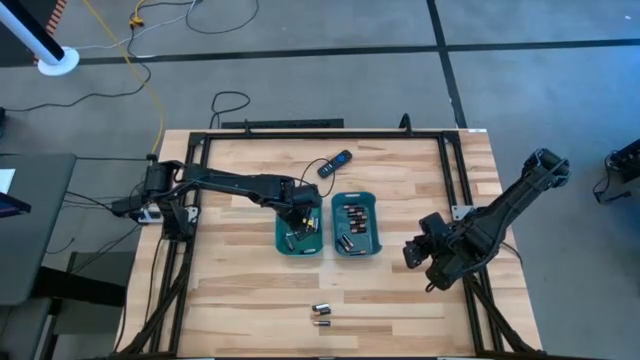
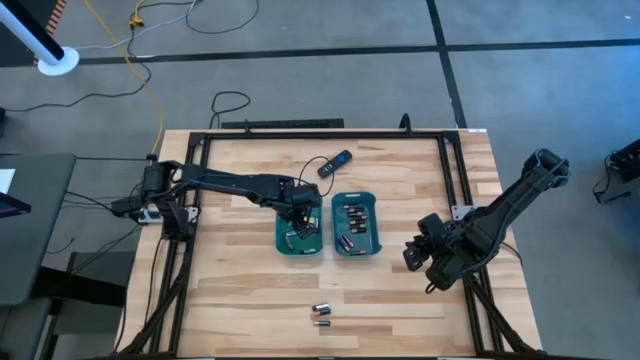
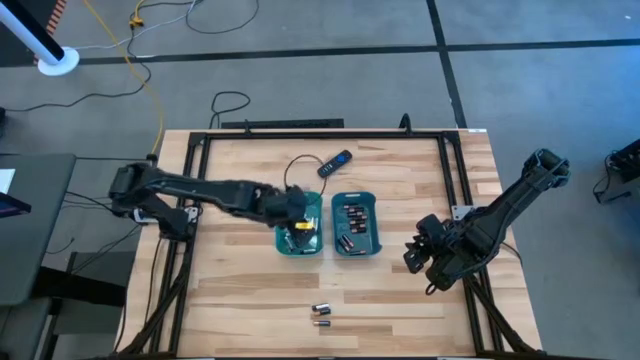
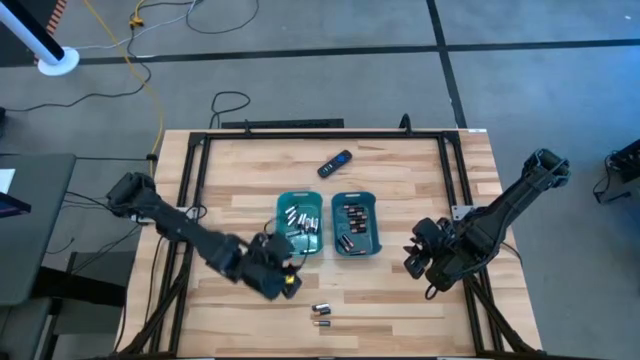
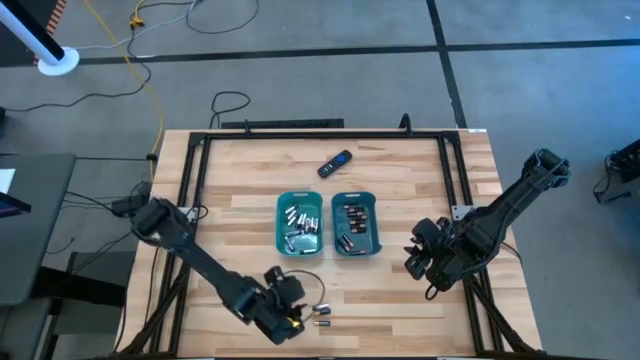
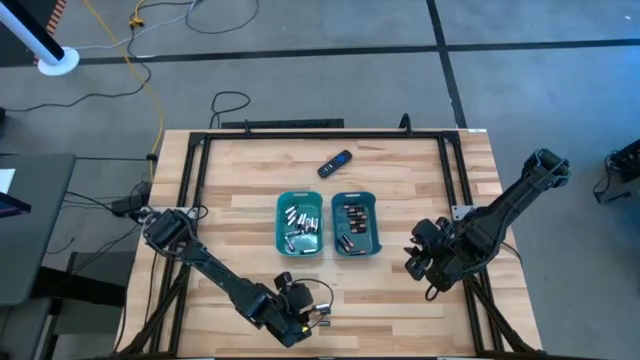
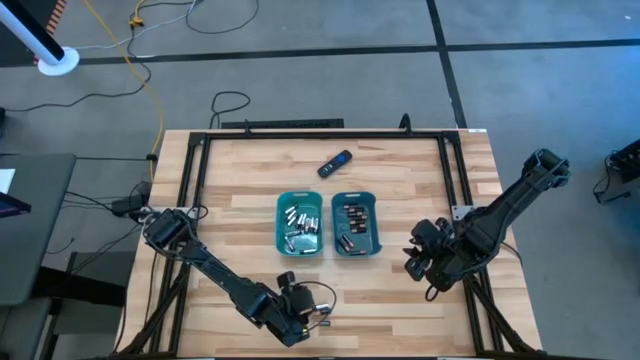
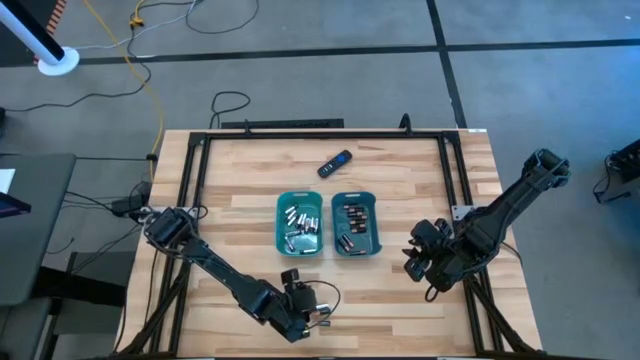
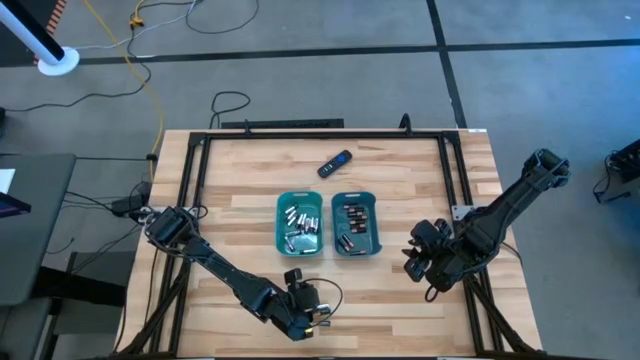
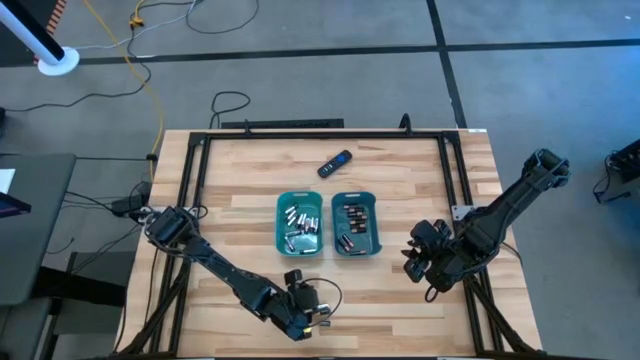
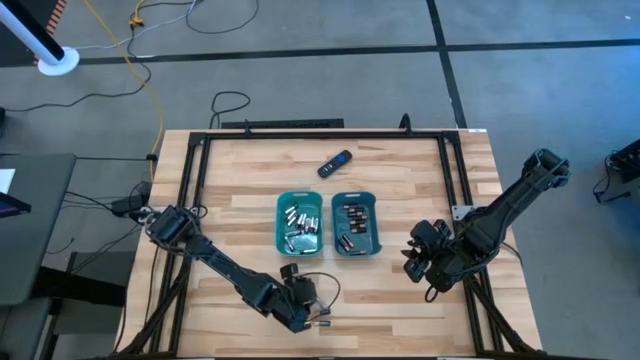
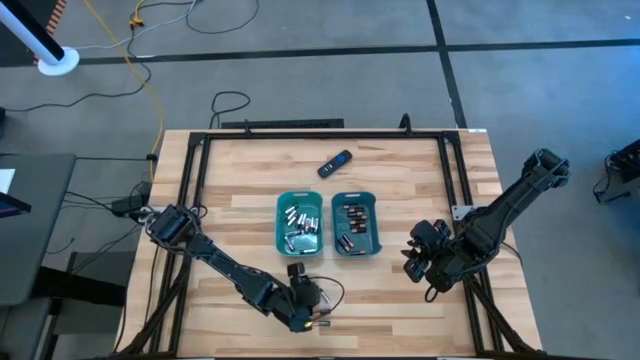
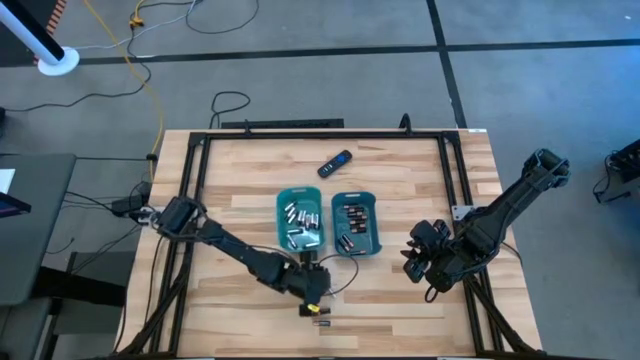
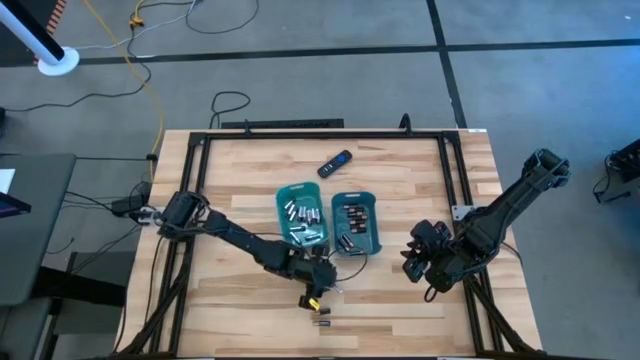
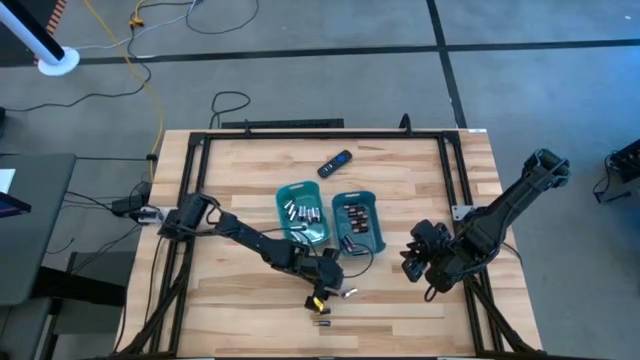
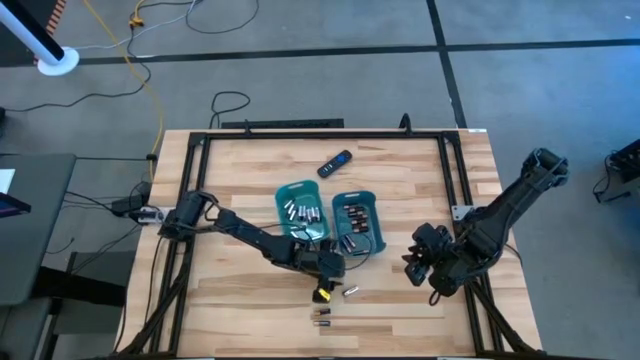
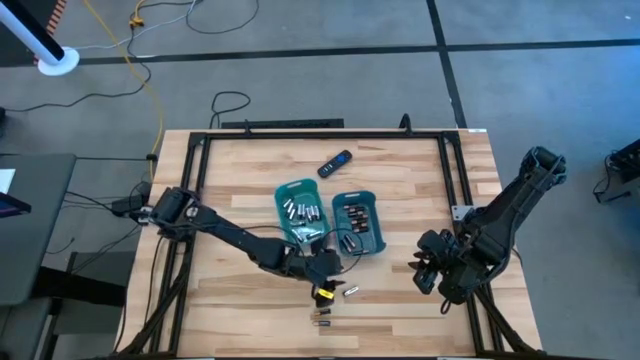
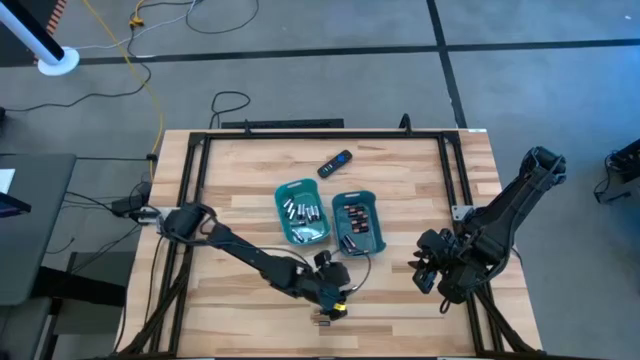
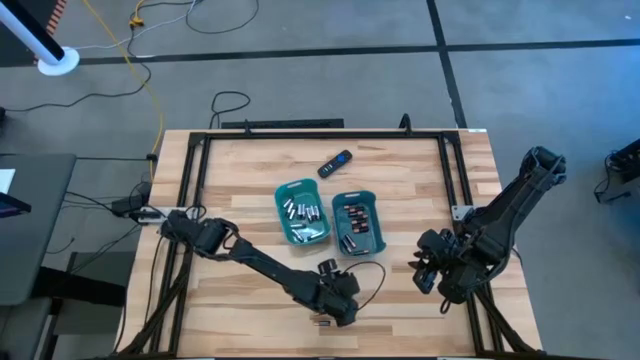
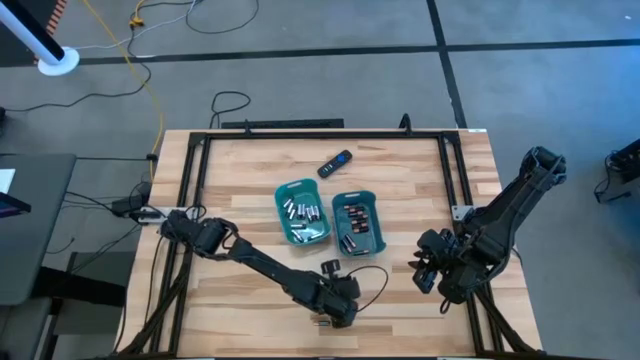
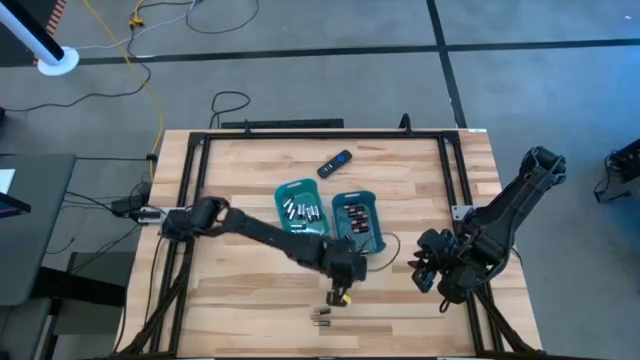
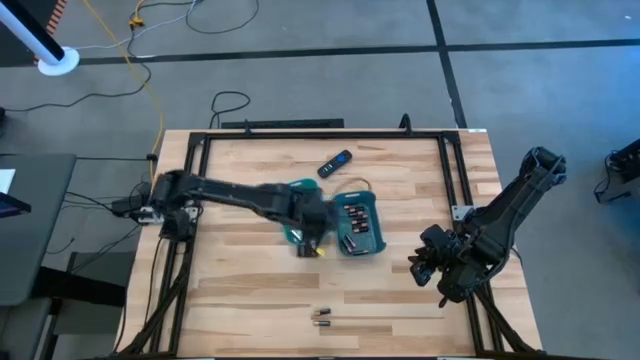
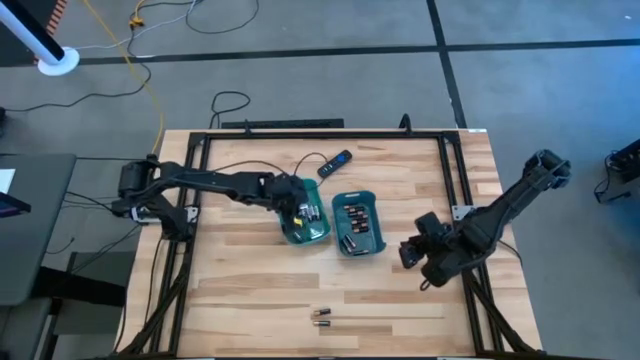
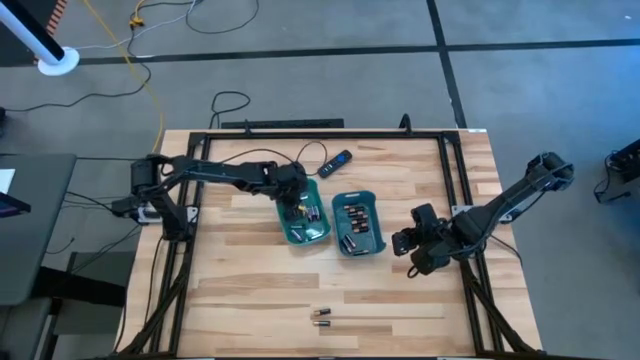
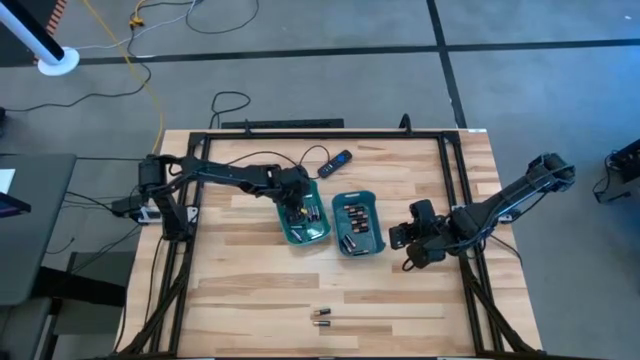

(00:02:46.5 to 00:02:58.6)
Task: Sort batteries
Put the silver and black battery into the green bin

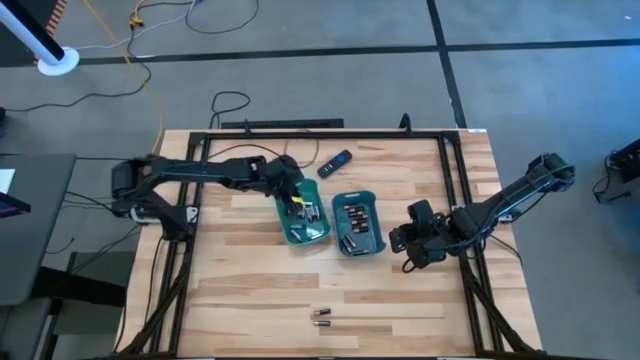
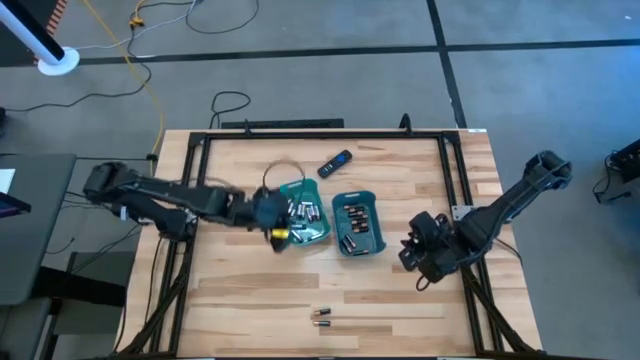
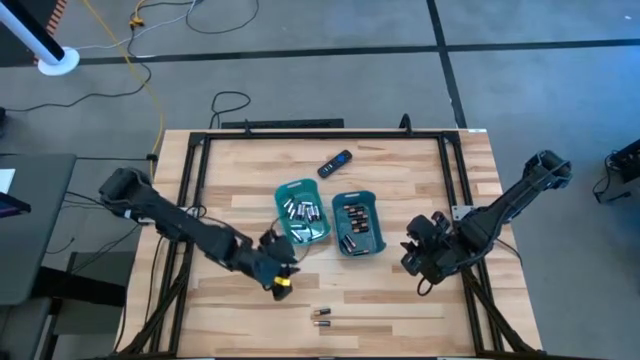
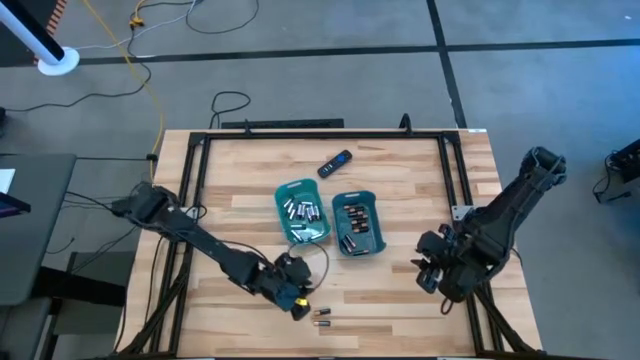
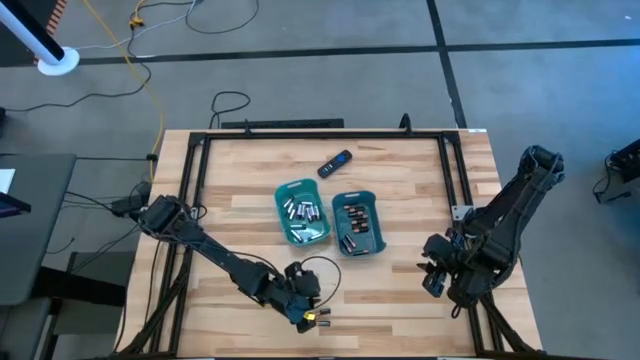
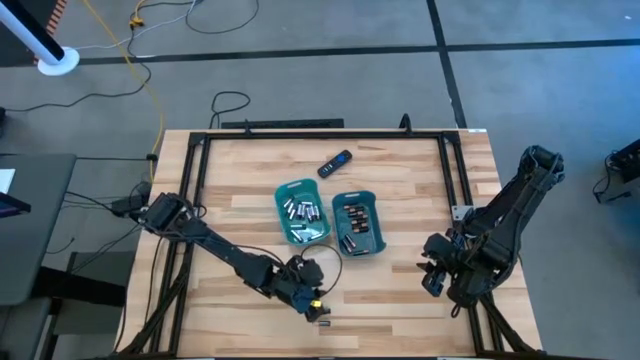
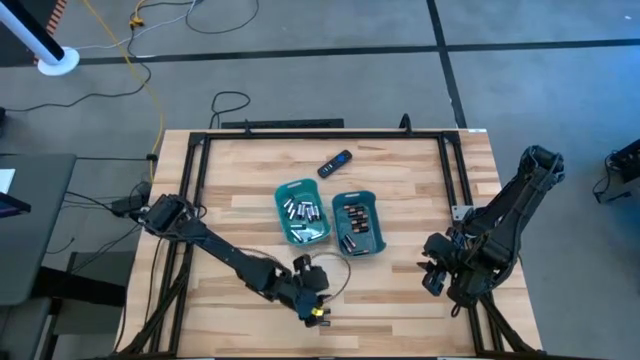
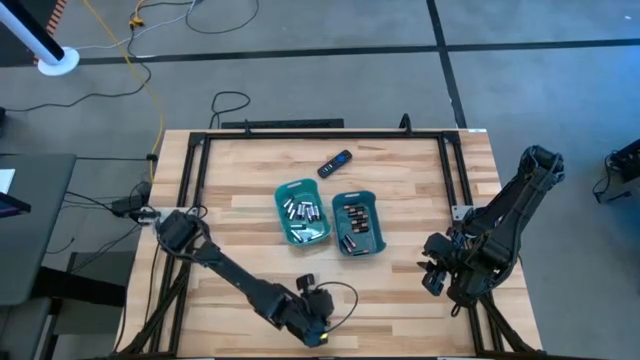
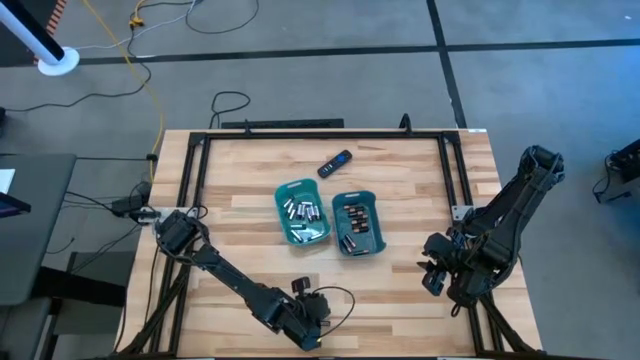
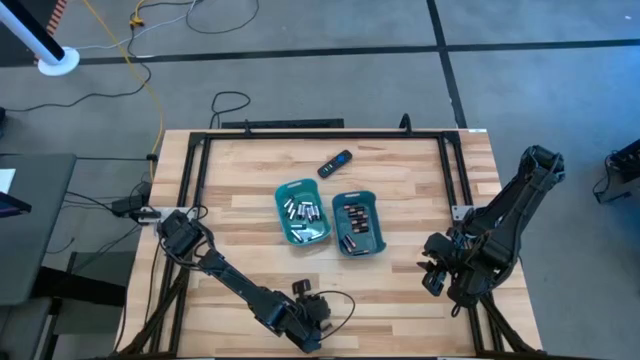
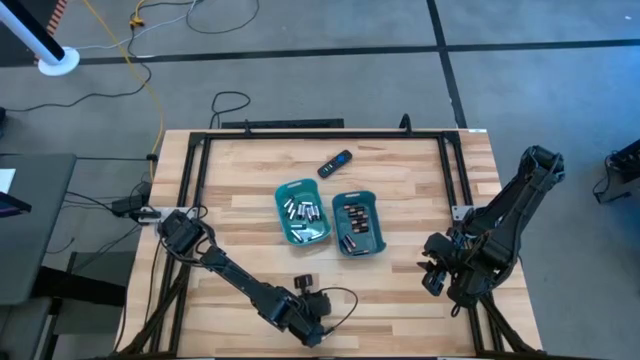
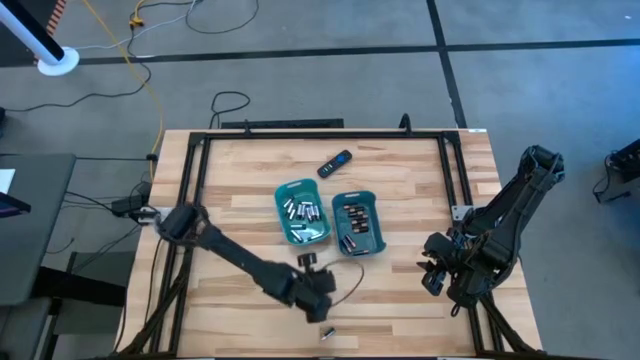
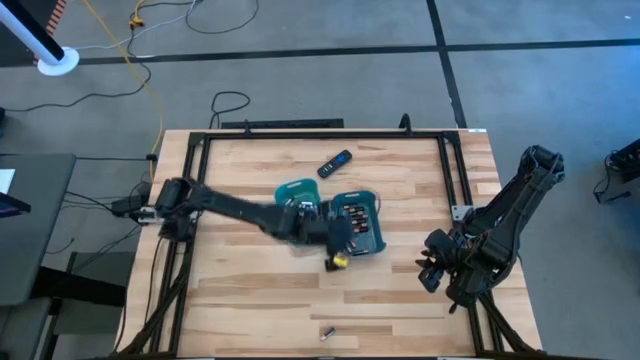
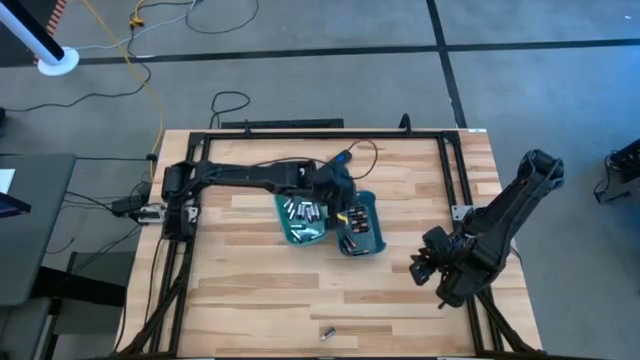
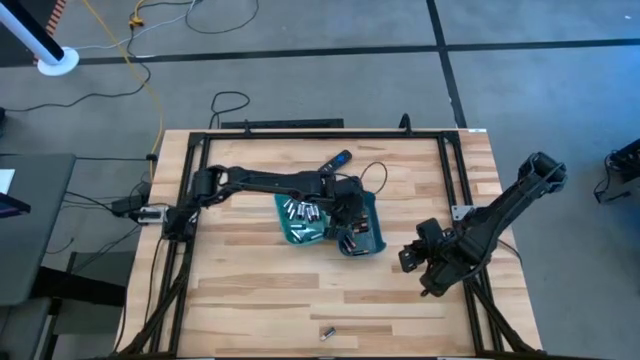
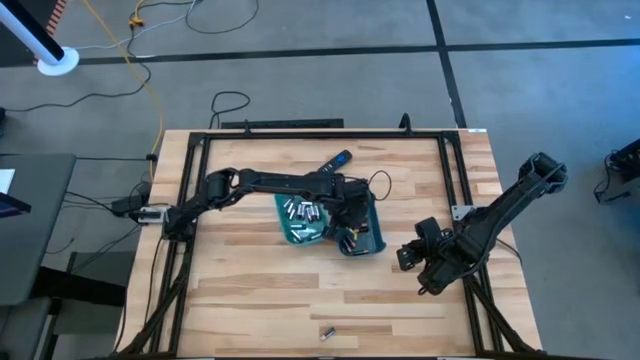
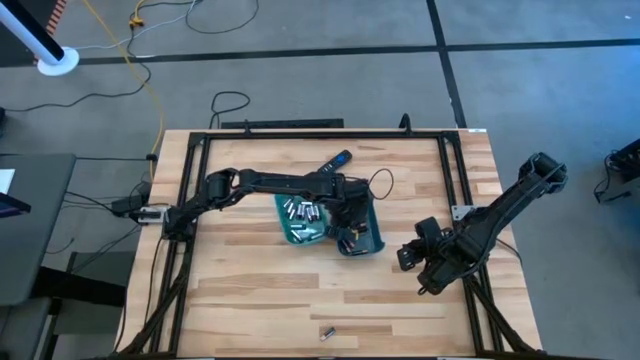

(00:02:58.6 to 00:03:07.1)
Put the copper and black battery into the blue bin
